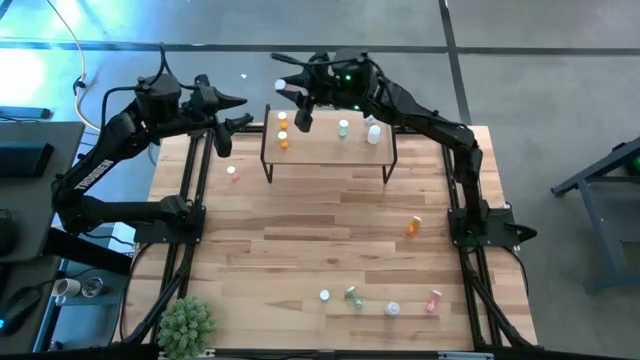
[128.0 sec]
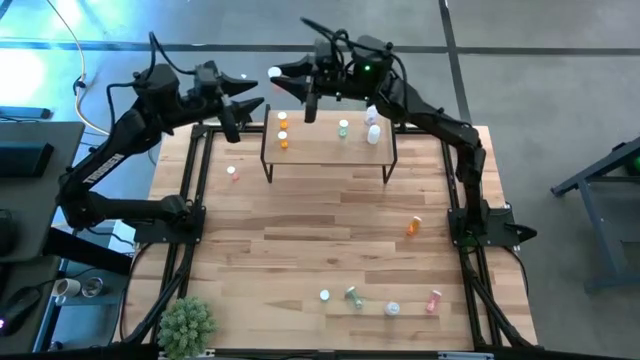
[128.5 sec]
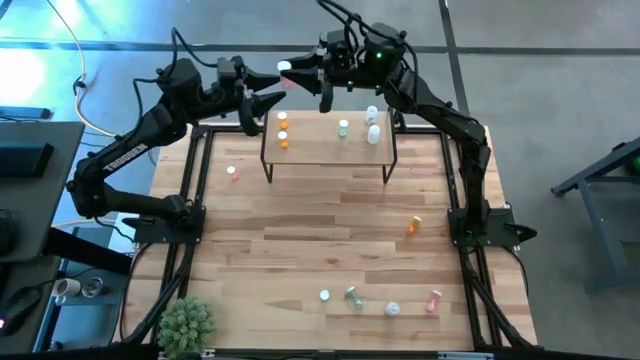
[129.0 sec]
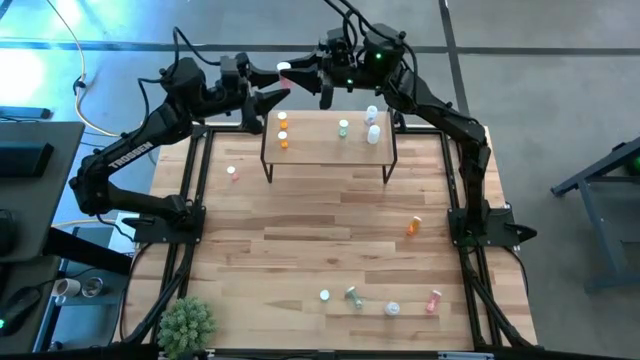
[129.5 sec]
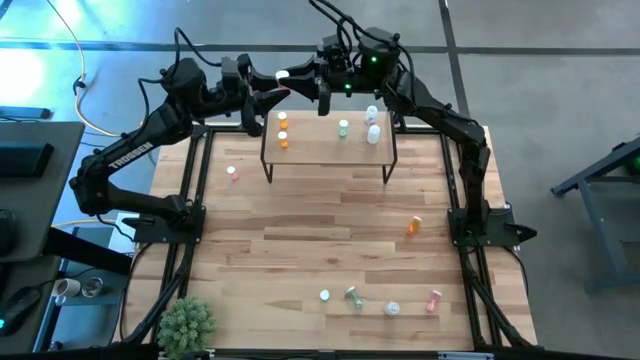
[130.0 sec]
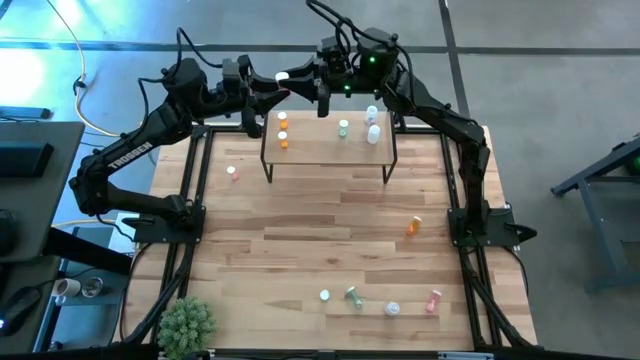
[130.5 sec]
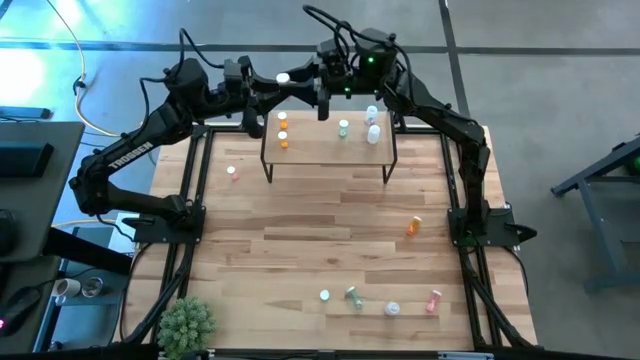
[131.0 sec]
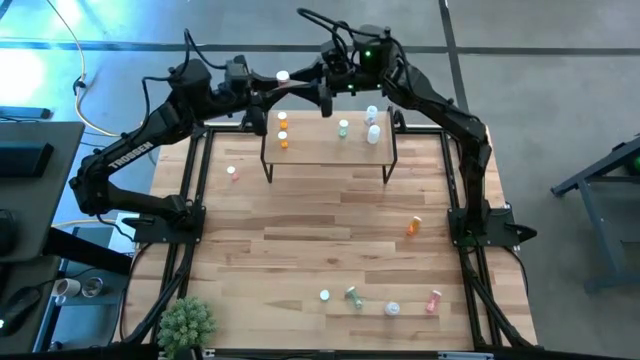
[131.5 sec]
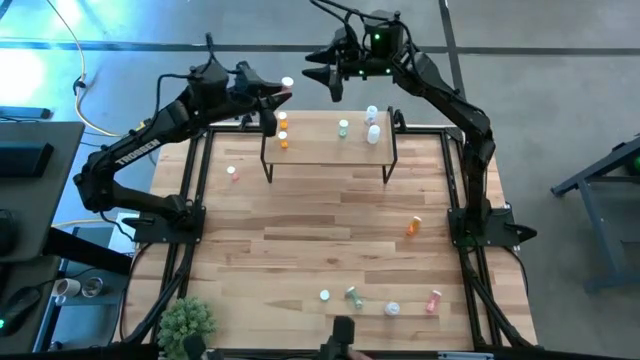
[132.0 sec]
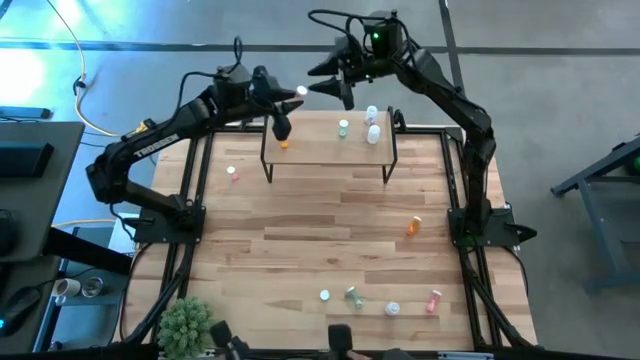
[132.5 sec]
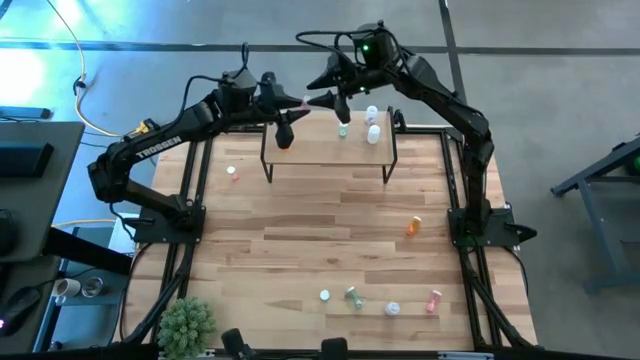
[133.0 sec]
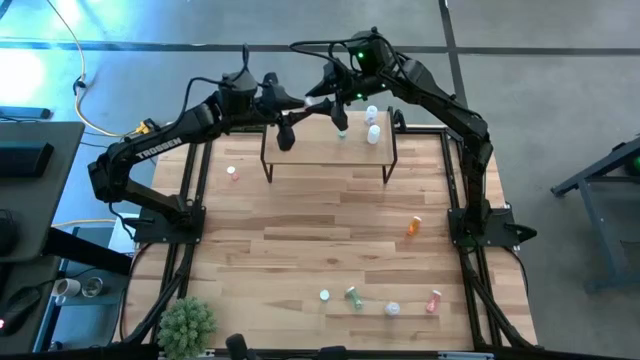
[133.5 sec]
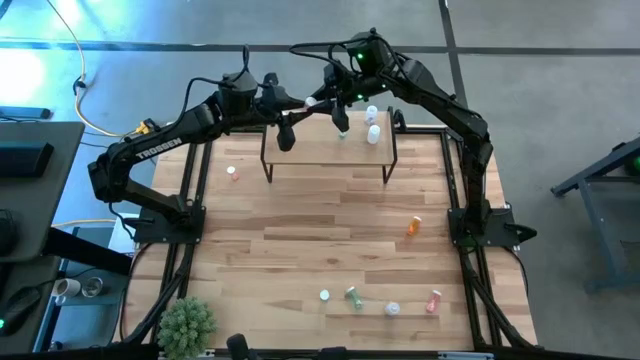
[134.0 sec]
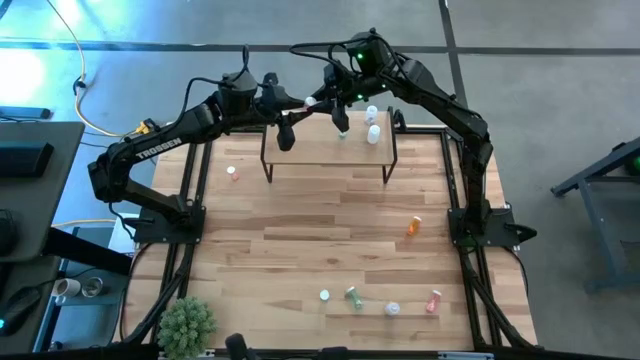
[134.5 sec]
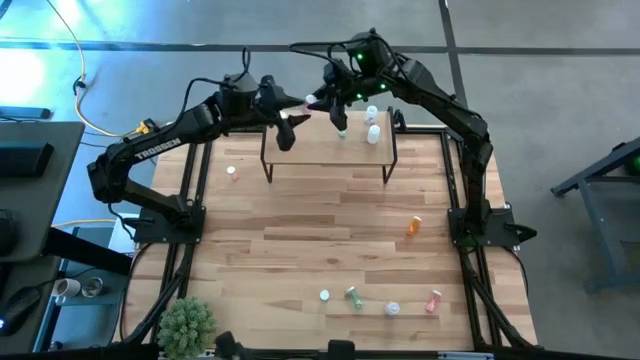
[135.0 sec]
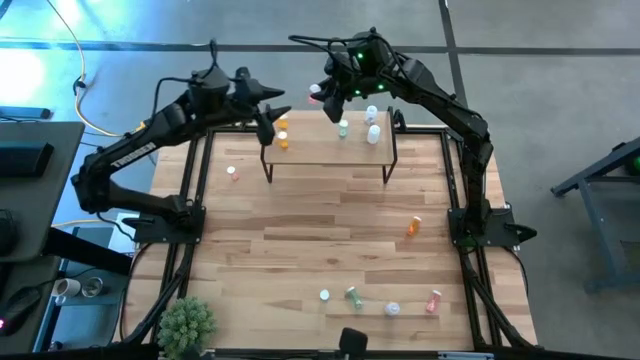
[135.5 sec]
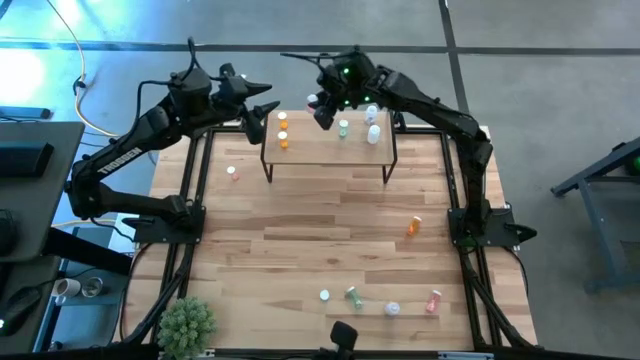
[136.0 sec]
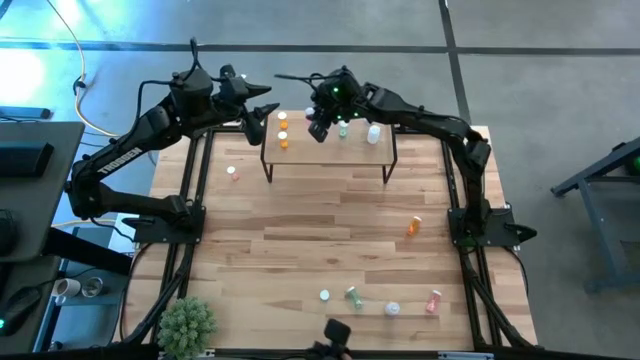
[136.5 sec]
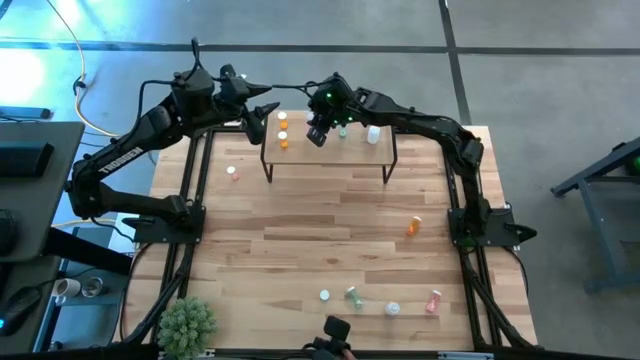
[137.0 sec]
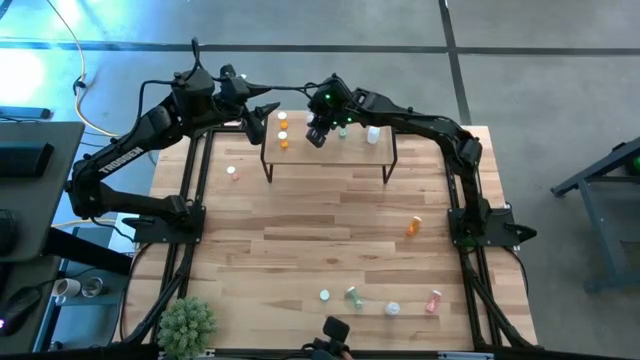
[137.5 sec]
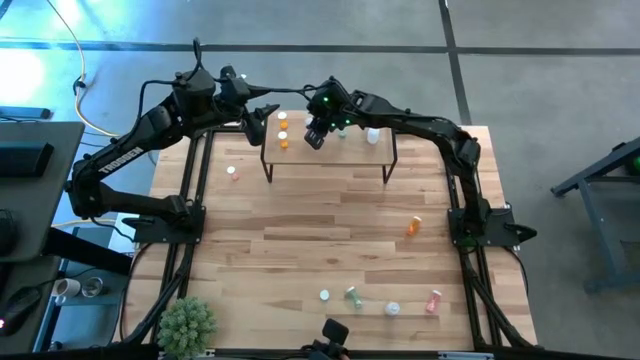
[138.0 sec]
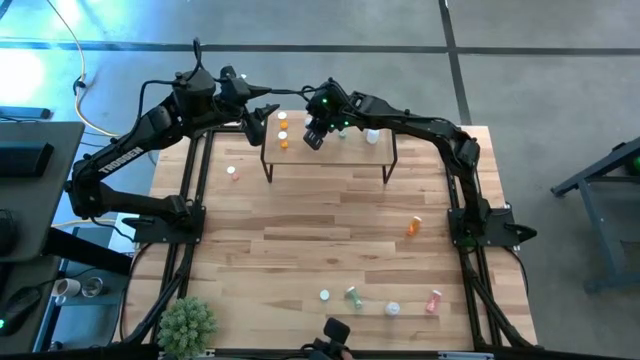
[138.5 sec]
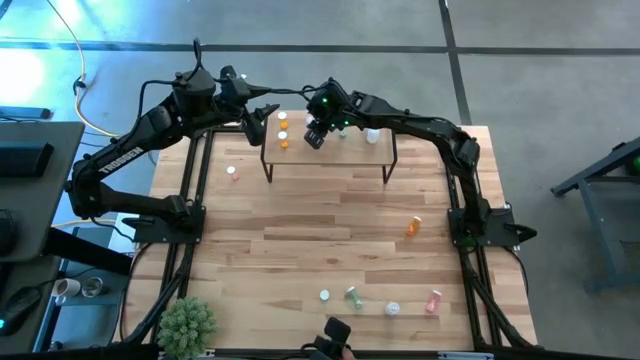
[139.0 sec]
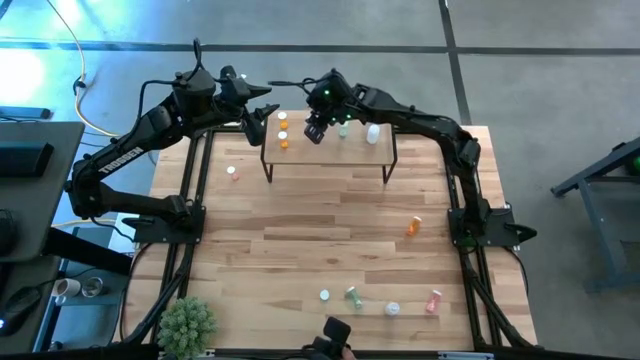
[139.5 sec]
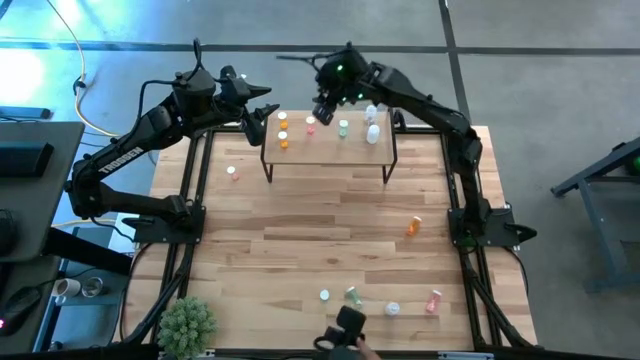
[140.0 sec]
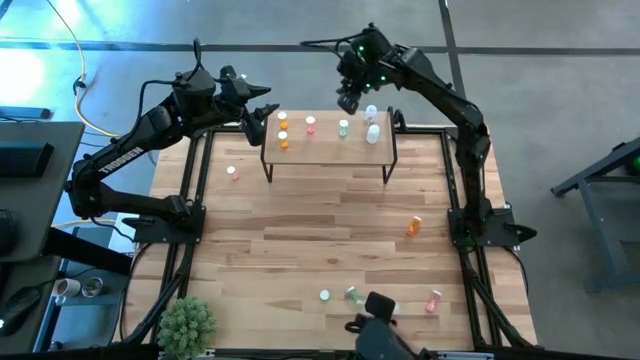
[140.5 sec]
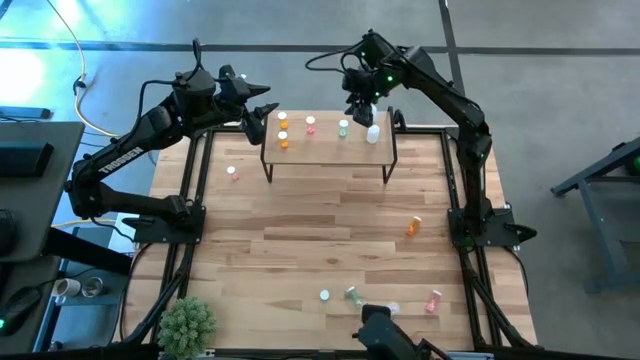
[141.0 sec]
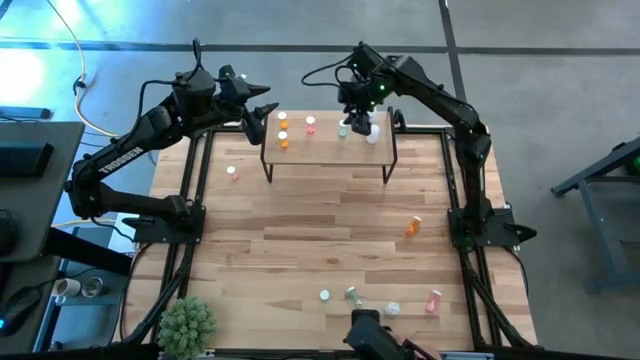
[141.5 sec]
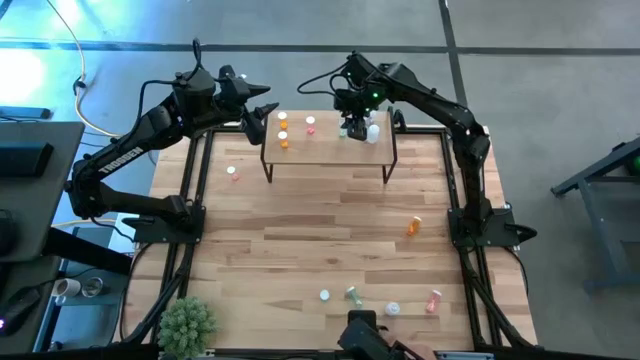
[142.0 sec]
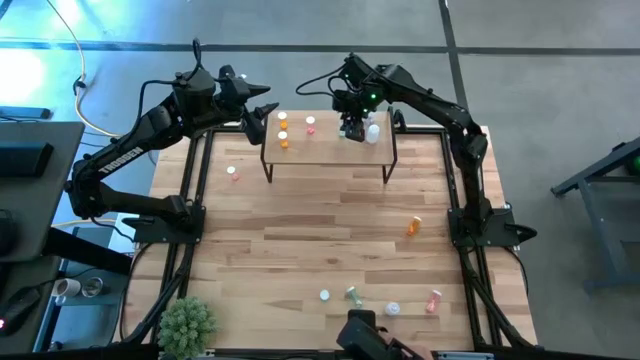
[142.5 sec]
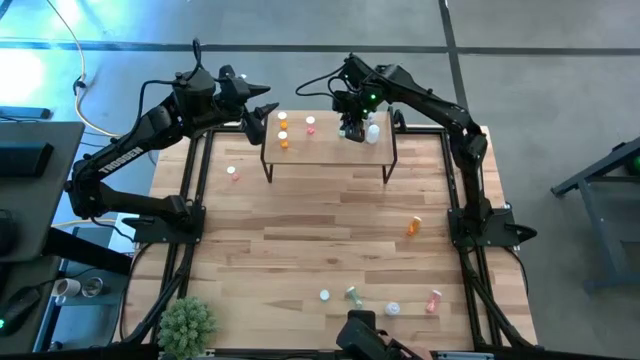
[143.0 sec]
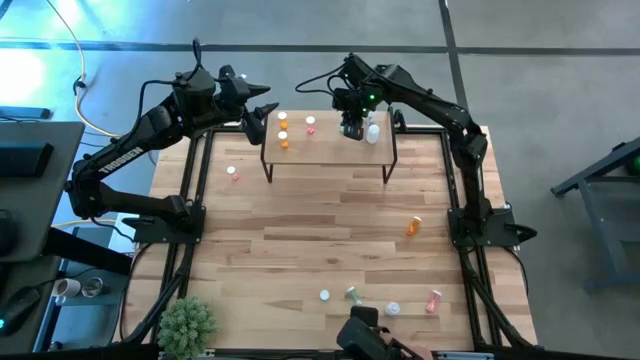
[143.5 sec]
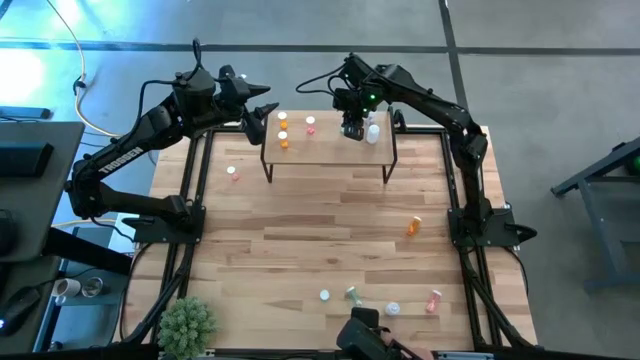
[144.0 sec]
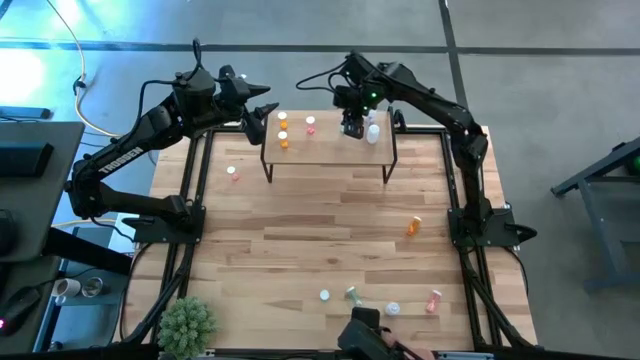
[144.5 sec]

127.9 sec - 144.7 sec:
Task: Pick and place medicine bottles onto shelf by color
Adjust the pill bottles on the shelf

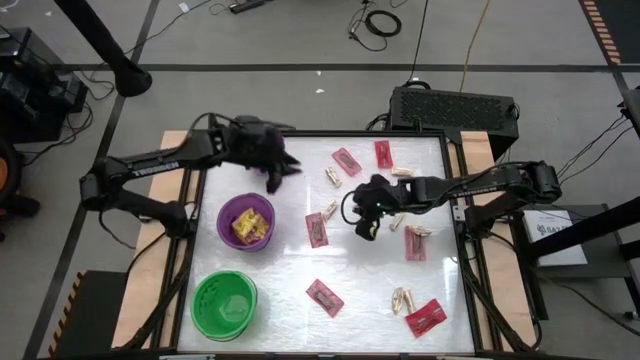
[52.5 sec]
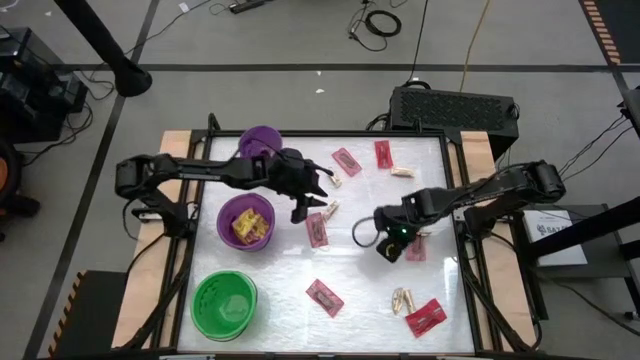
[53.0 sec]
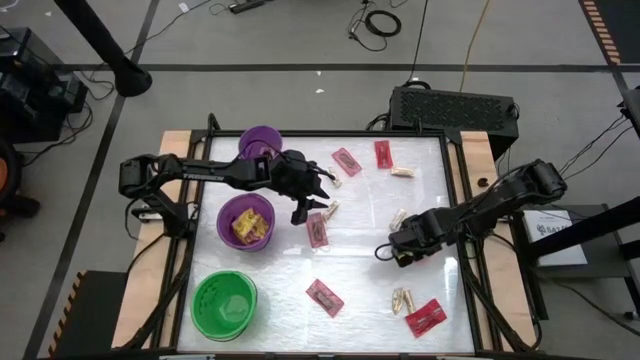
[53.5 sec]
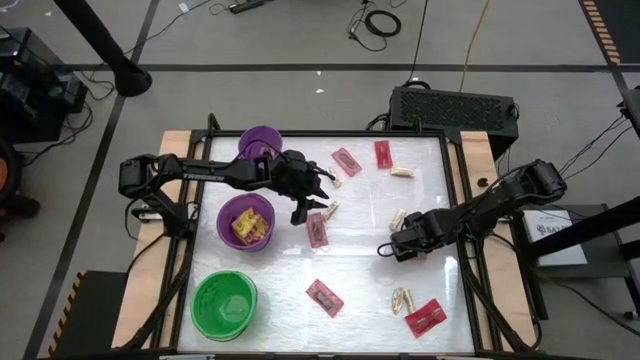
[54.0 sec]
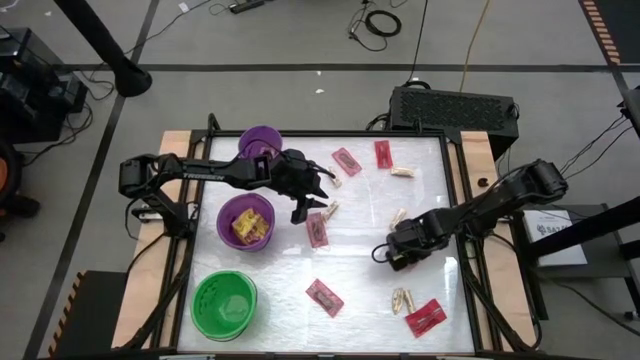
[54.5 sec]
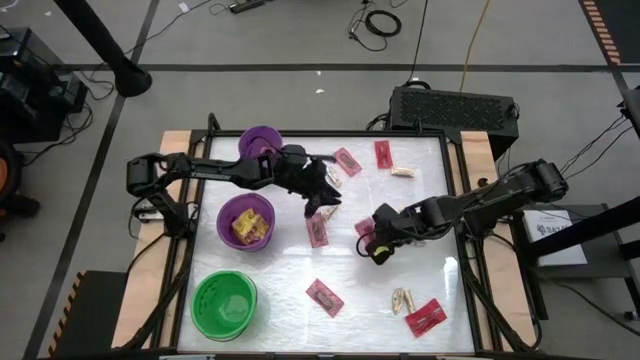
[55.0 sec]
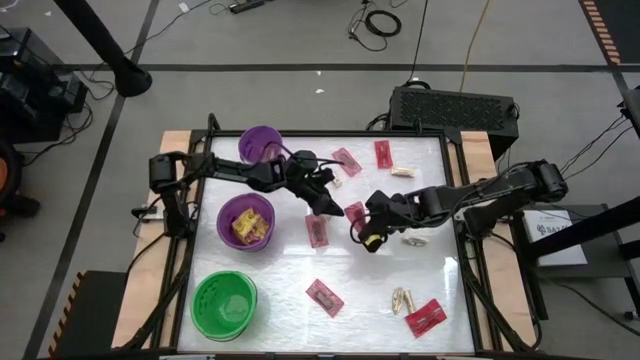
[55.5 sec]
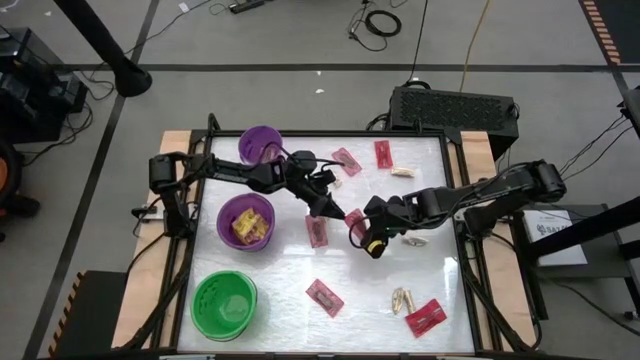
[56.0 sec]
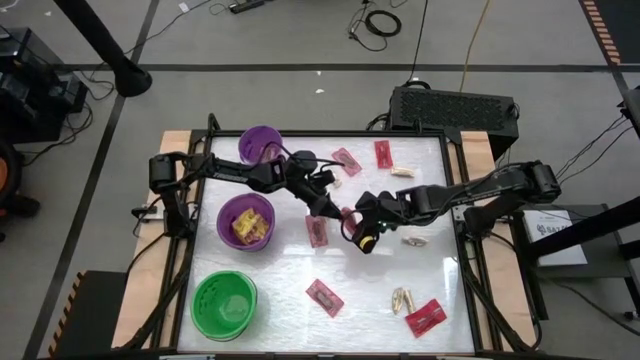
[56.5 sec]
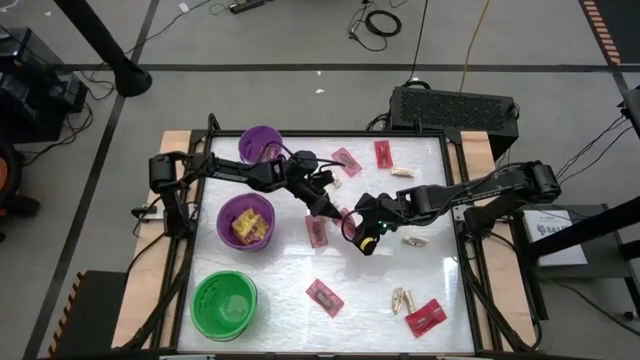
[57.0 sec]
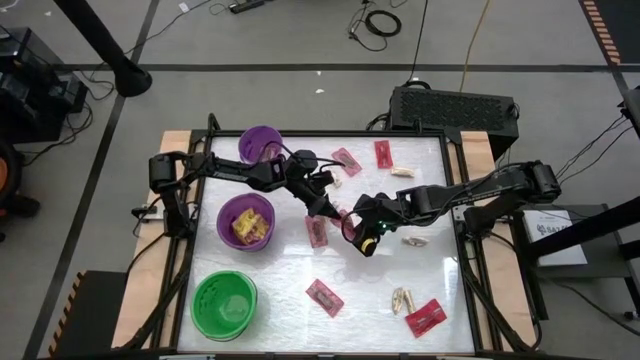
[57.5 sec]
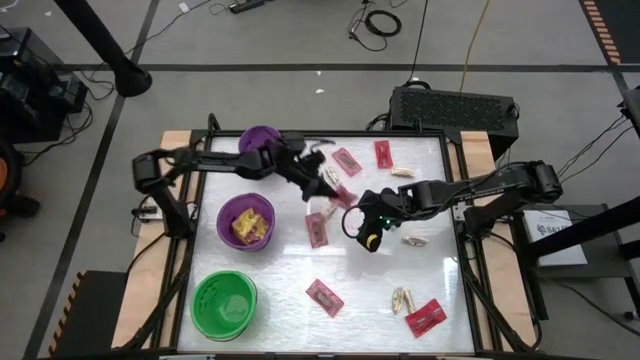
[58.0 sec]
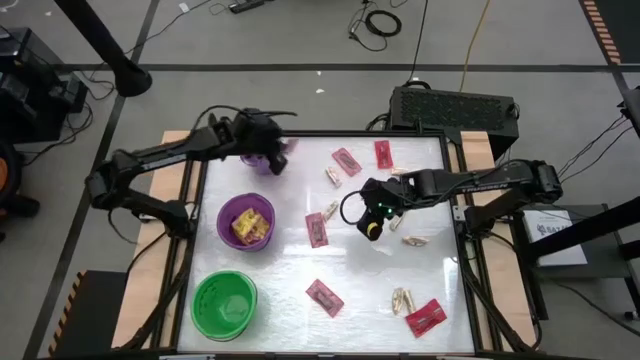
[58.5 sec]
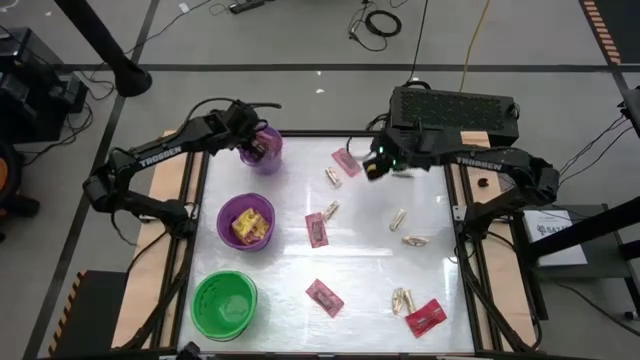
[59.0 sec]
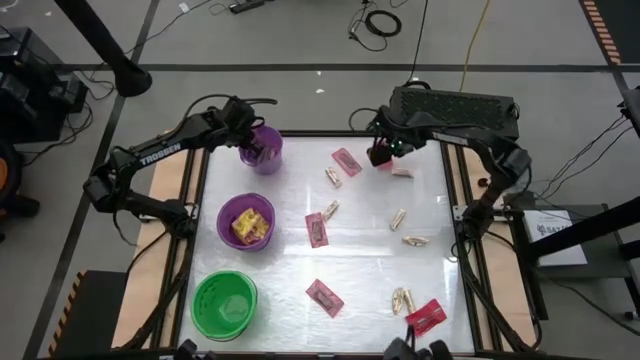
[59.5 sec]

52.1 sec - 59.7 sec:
Task: Sort candy by brand, put in halloween buckets
Put the red candy into the top purple bucket
